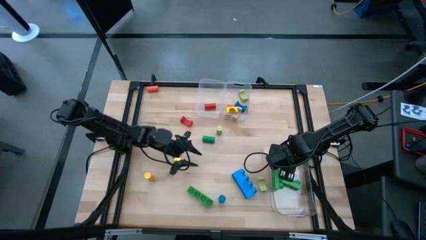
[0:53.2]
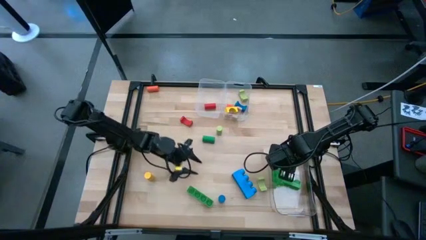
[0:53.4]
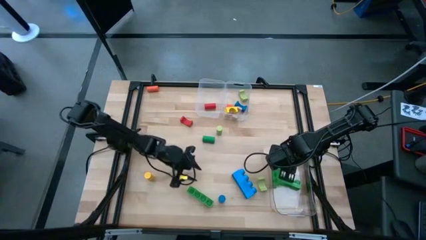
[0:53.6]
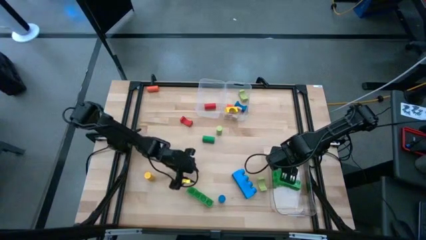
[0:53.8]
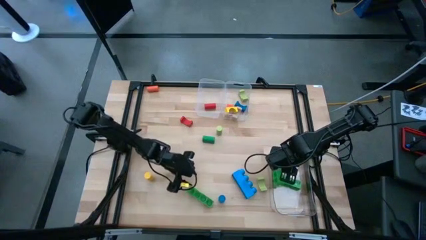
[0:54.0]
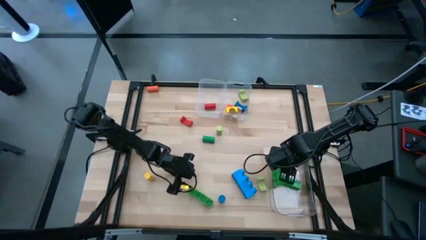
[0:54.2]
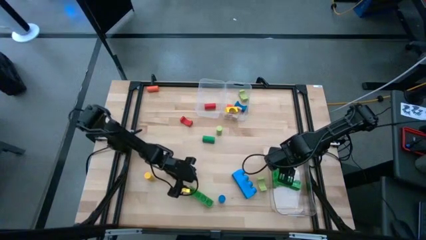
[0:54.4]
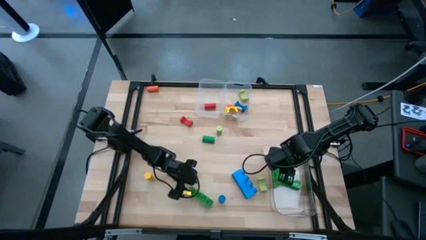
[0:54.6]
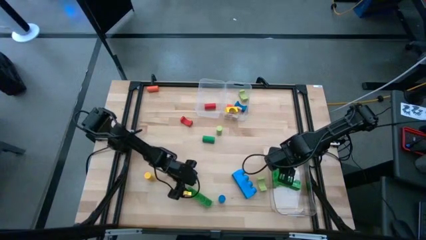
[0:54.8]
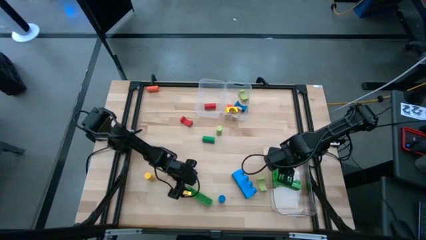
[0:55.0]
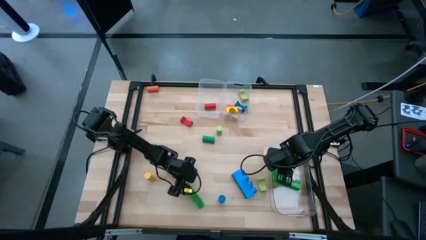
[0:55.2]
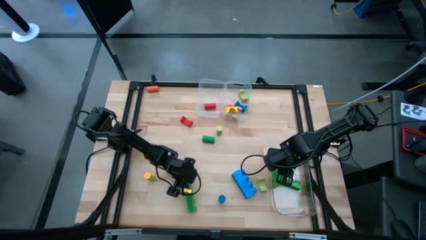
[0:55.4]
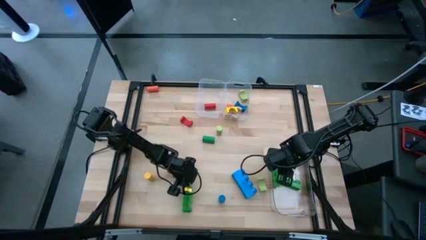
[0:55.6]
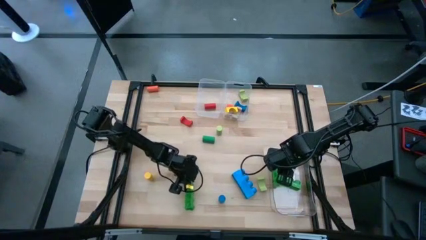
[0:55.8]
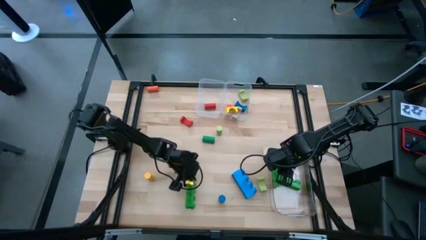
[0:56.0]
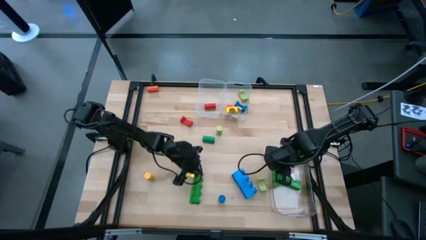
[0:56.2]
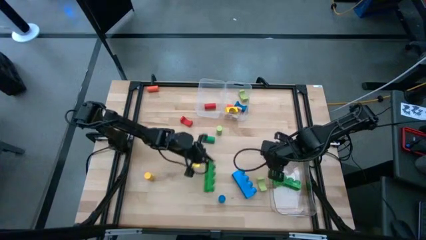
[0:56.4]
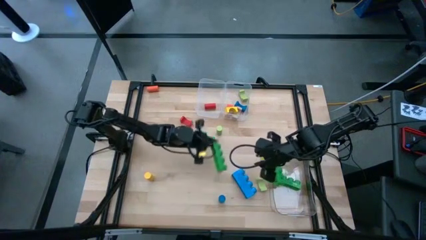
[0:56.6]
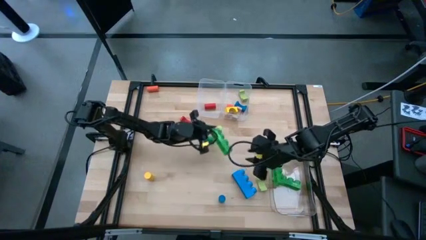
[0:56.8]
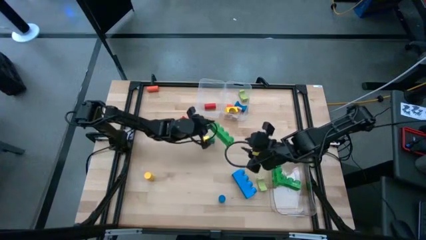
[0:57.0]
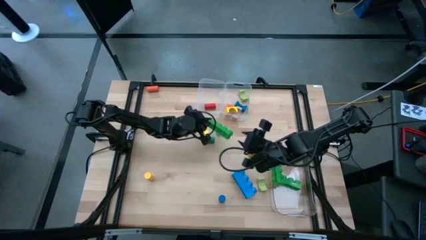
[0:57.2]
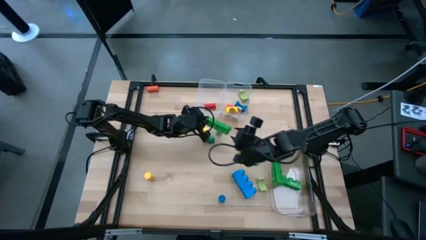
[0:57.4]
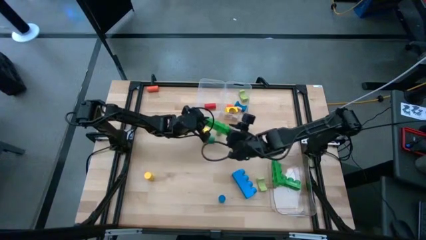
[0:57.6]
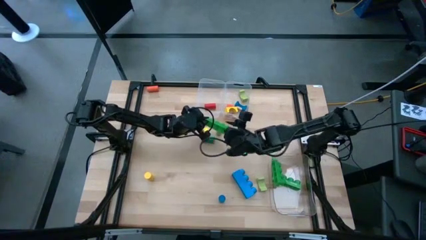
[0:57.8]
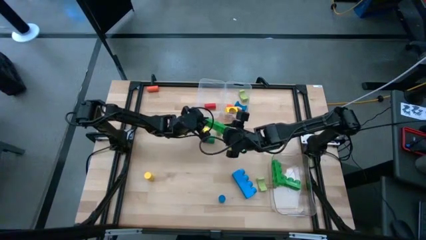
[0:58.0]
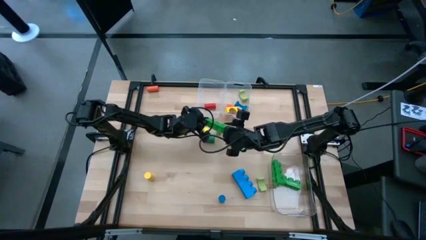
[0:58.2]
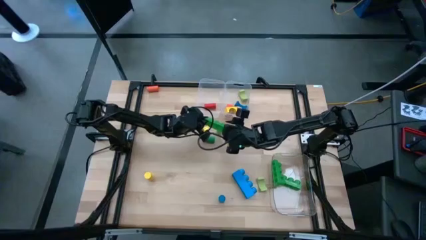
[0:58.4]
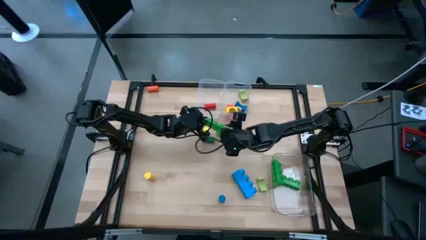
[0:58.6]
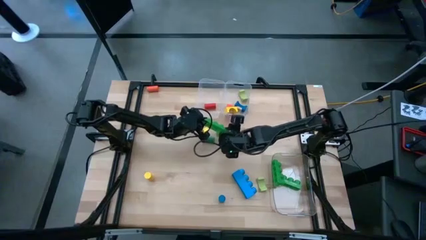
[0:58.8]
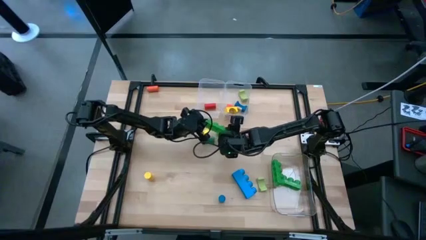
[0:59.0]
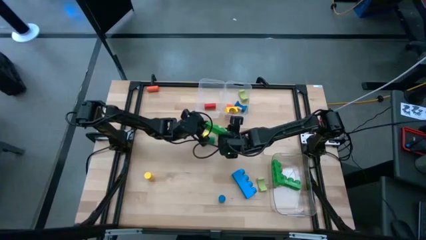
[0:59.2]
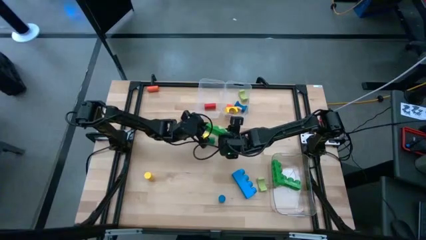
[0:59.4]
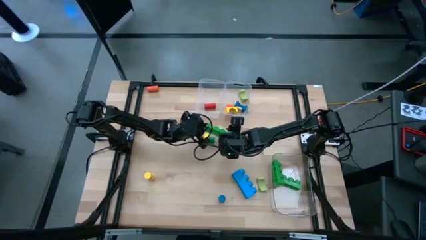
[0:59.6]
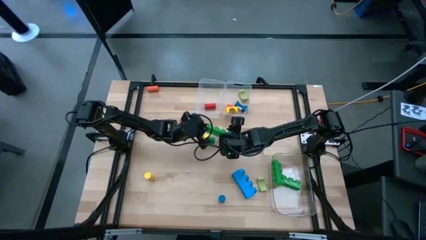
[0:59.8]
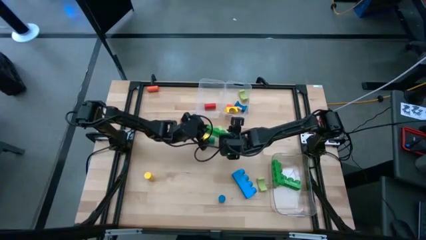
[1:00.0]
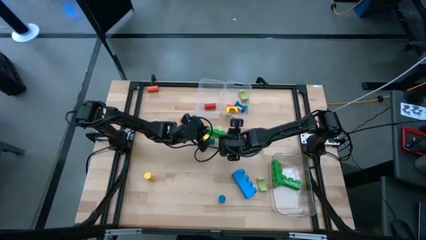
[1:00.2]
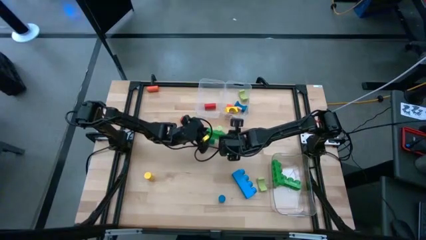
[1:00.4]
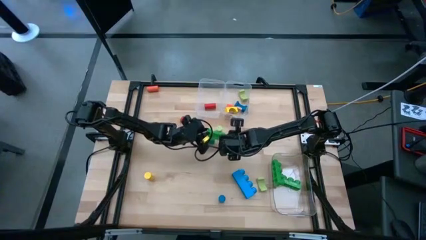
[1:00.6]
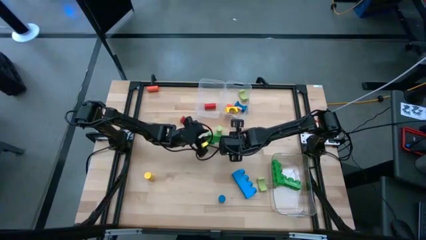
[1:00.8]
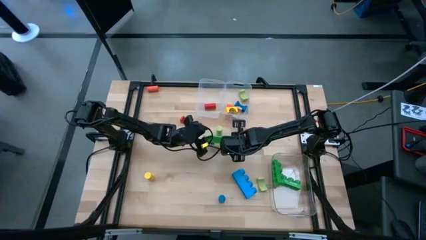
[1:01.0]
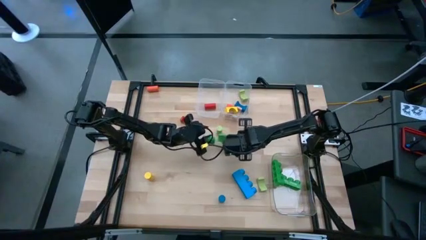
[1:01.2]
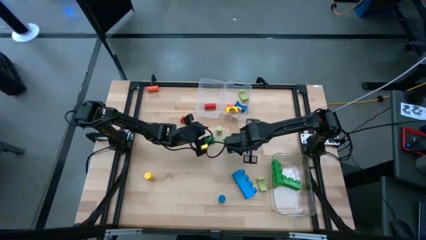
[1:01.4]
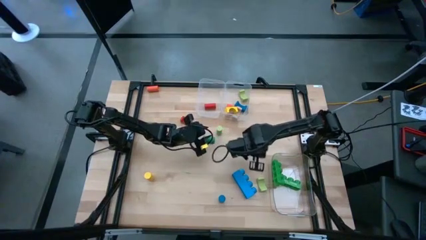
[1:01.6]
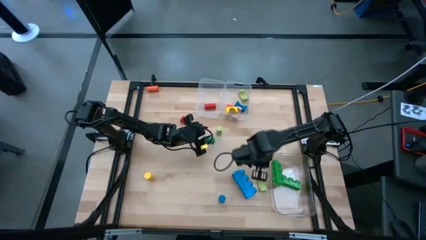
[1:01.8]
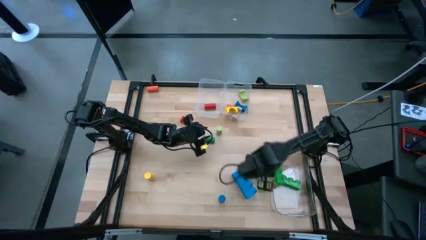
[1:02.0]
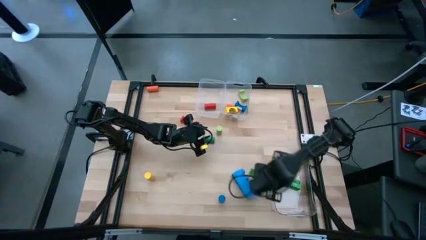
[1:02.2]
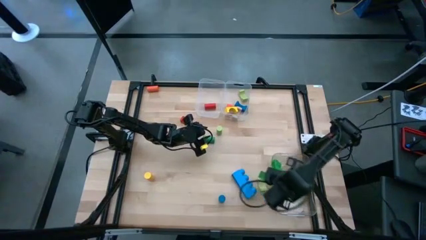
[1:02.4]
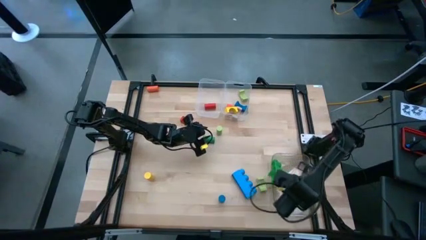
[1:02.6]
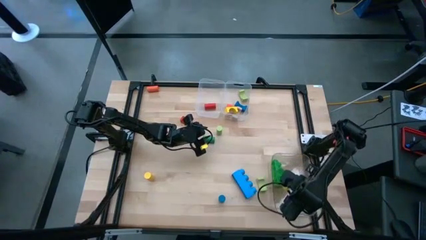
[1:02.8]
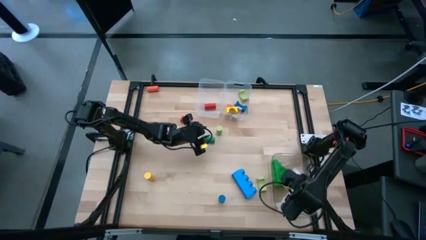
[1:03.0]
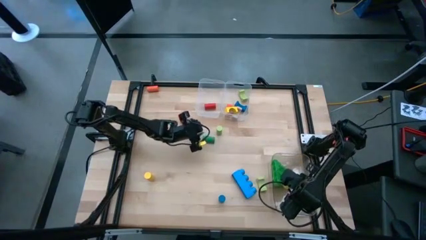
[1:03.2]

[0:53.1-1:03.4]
Task: Sort blocks by size
Put the green 4 stud game piece into the bottom transparent bin

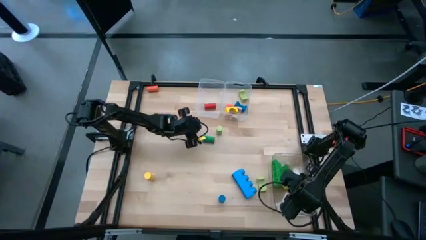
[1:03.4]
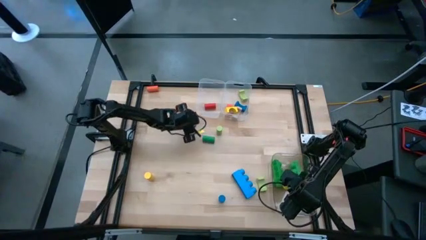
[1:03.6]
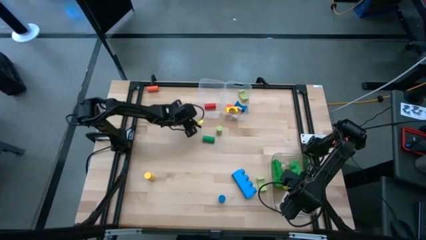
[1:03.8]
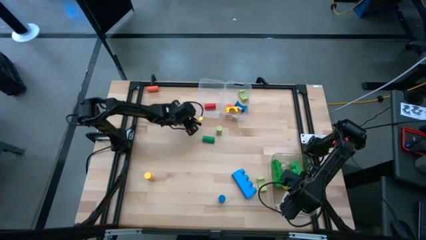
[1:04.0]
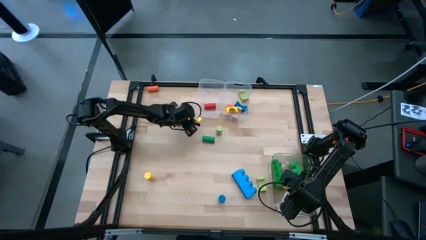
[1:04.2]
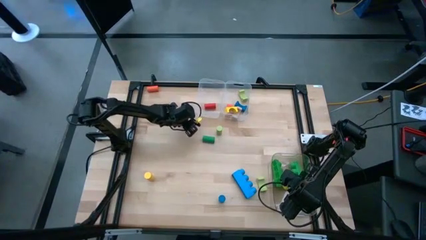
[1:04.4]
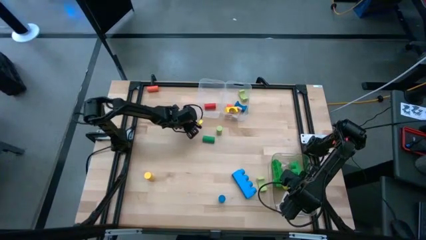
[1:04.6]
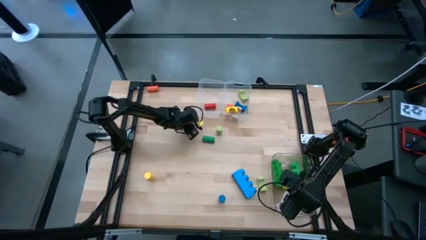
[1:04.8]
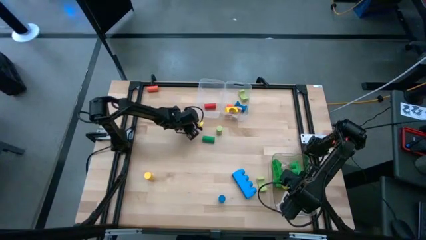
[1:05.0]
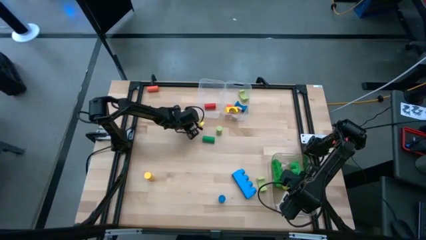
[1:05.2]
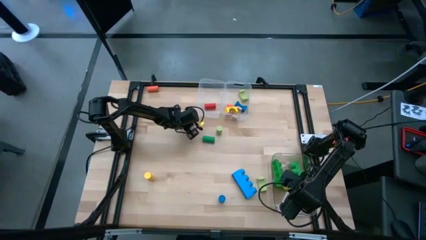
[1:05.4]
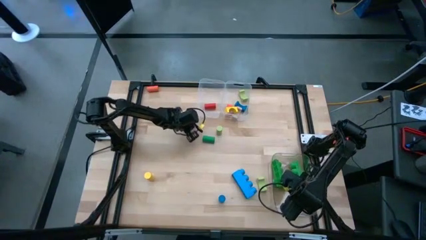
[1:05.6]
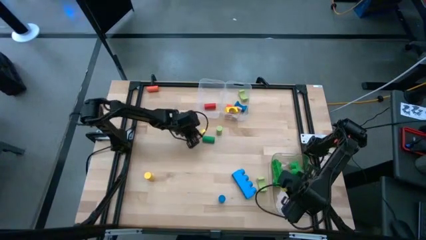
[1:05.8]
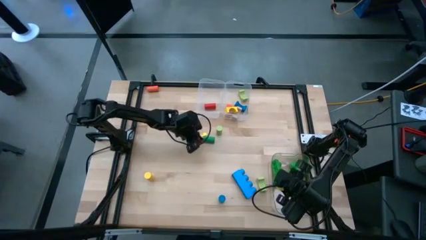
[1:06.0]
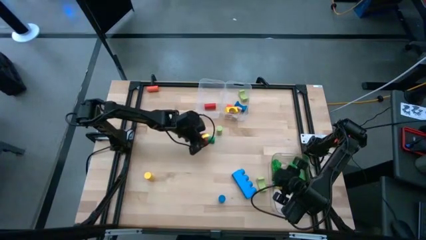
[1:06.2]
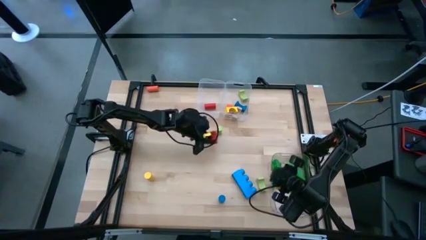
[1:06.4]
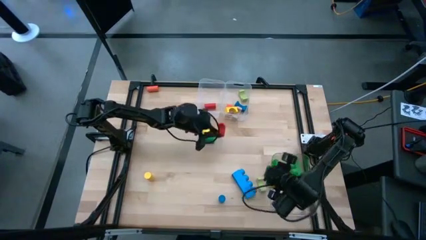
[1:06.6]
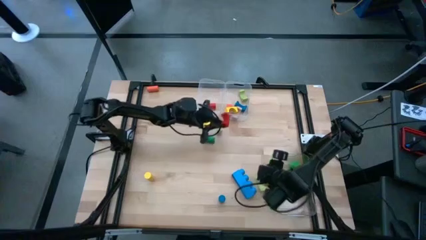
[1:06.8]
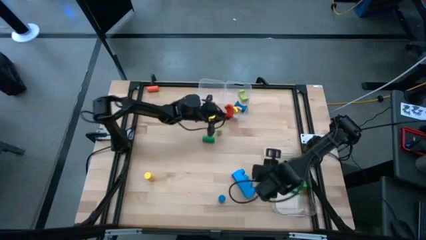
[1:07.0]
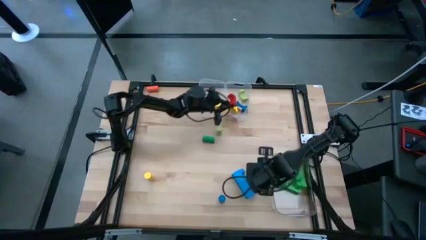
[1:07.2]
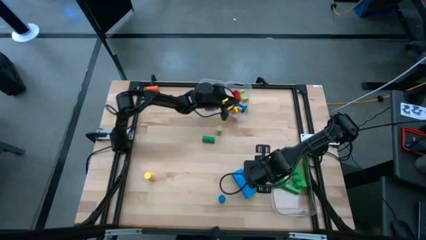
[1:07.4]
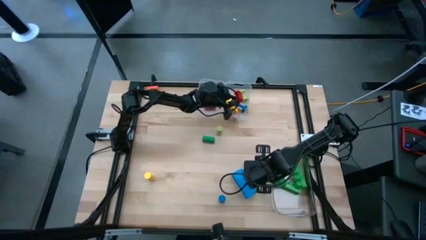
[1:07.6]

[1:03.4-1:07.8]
Put the red arch block into the right transparent bin

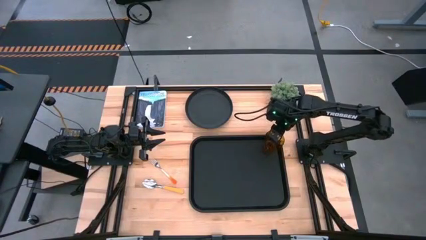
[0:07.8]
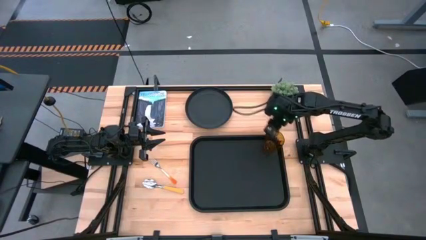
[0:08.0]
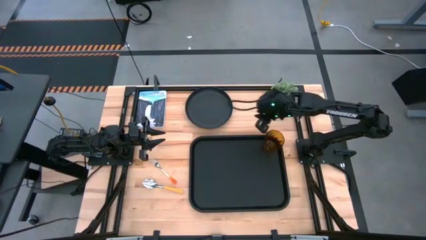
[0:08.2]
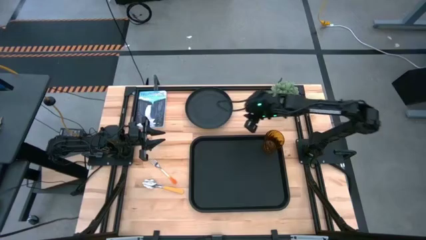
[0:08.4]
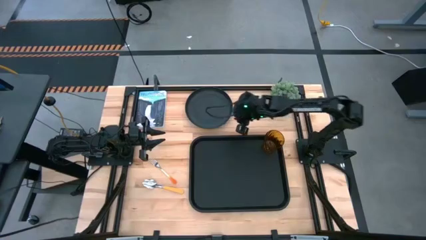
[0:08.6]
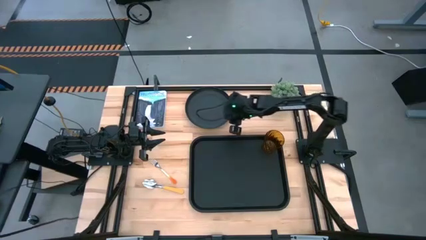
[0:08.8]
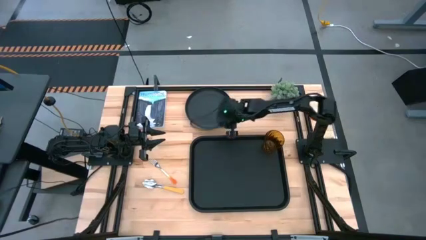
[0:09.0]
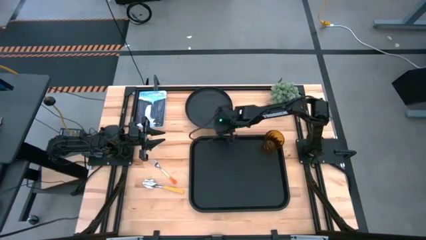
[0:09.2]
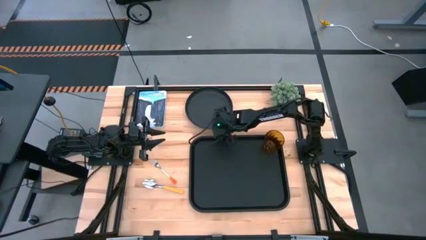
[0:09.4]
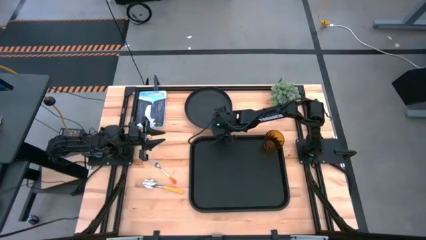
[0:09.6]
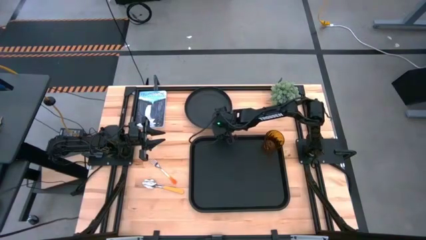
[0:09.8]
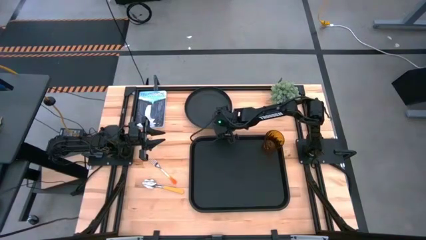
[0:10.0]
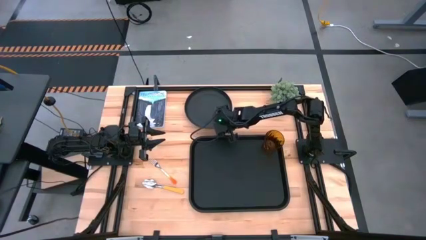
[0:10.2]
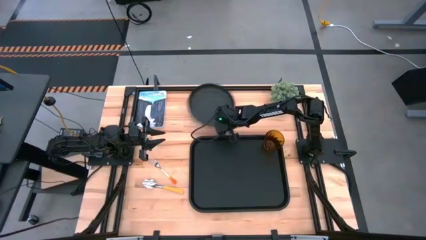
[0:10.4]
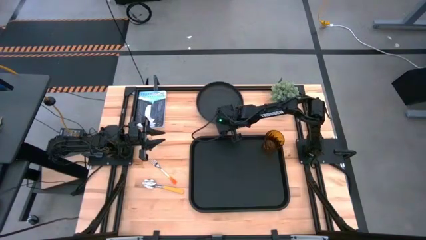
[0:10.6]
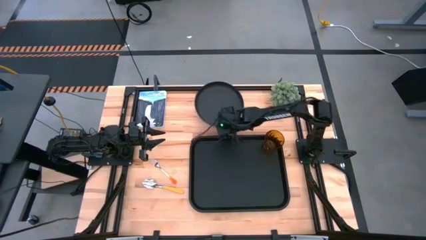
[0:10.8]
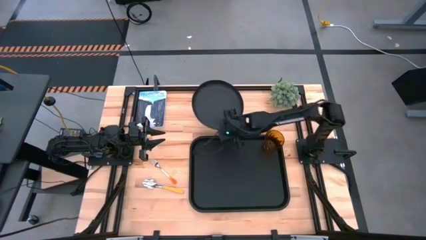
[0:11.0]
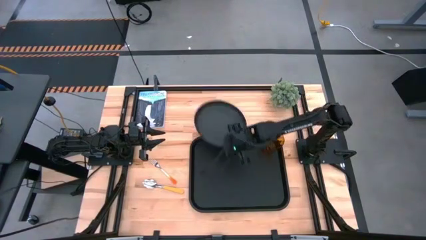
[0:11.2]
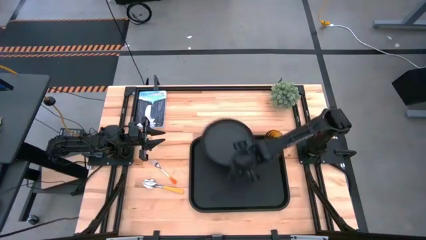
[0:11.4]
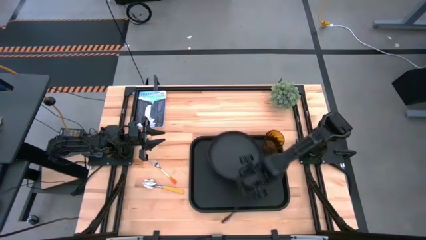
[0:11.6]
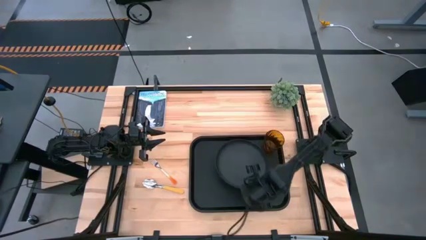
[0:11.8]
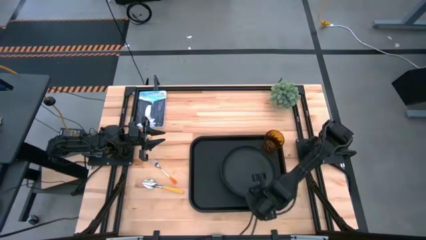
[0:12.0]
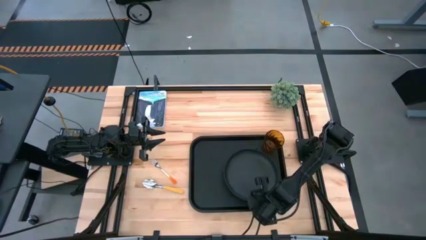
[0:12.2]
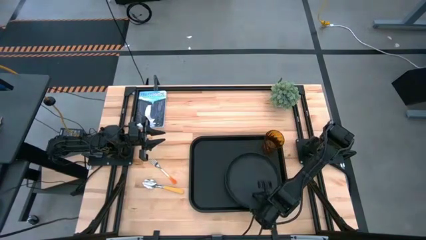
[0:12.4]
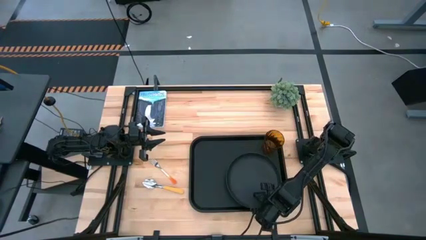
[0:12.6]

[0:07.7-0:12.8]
Task: Pick and place plate/cup/fork/spoon on tray
Put the black plate on the black tray to the bottom left of the orange cup
